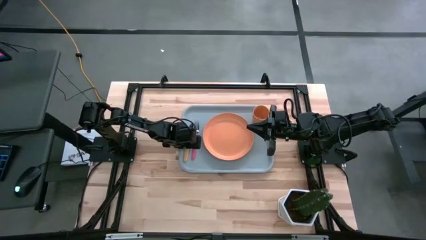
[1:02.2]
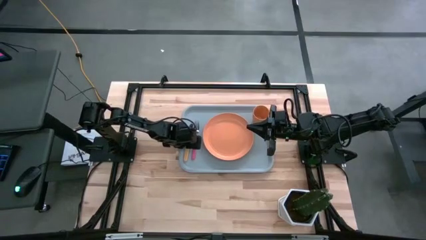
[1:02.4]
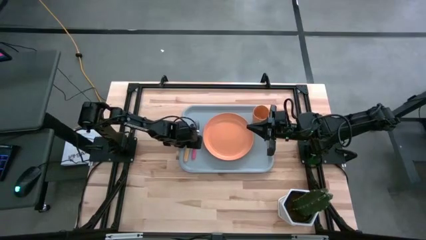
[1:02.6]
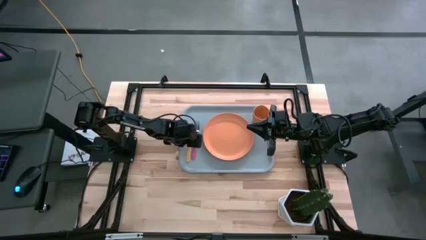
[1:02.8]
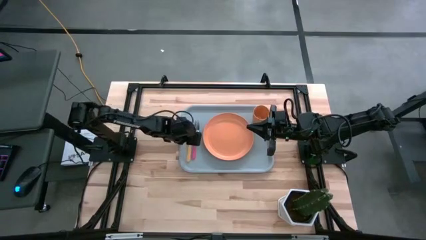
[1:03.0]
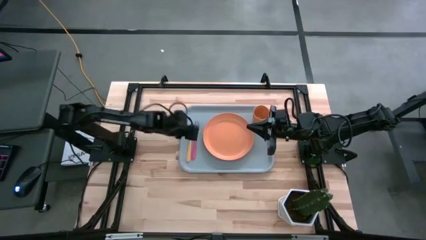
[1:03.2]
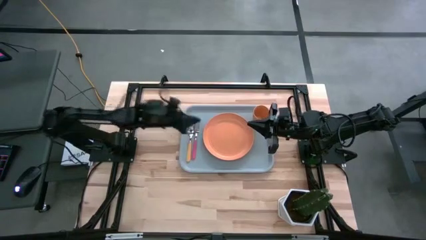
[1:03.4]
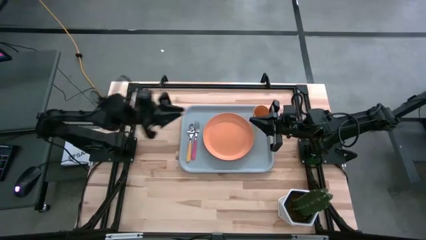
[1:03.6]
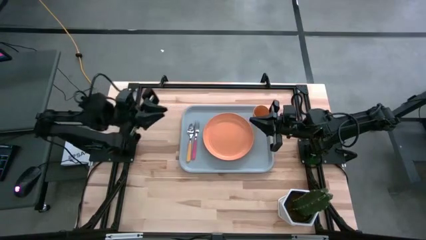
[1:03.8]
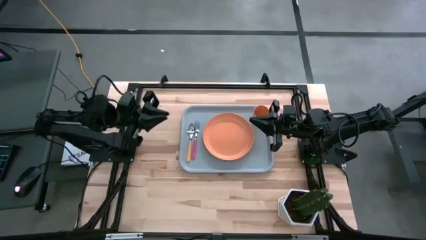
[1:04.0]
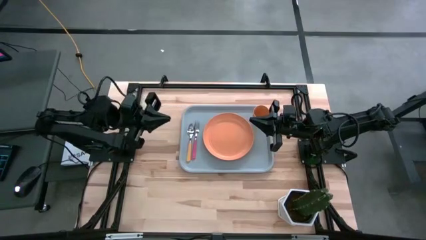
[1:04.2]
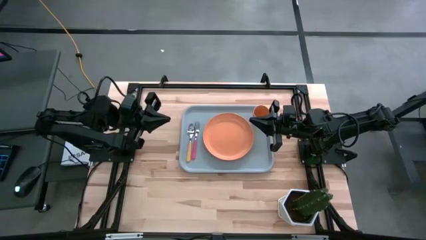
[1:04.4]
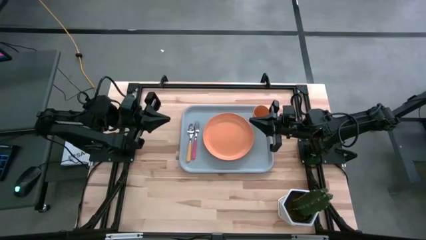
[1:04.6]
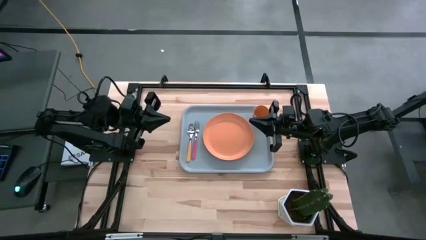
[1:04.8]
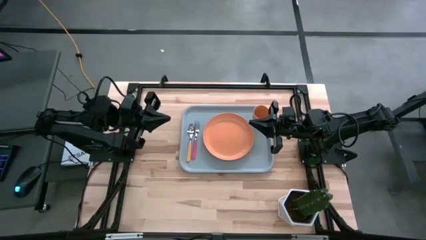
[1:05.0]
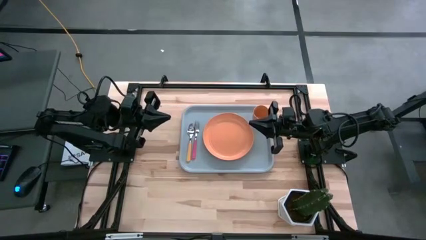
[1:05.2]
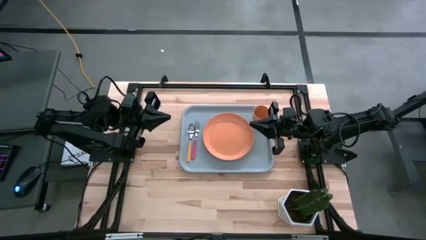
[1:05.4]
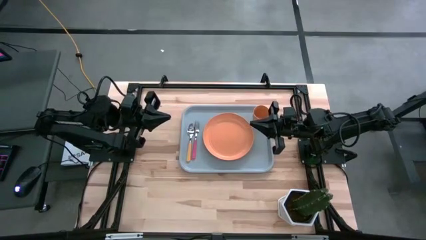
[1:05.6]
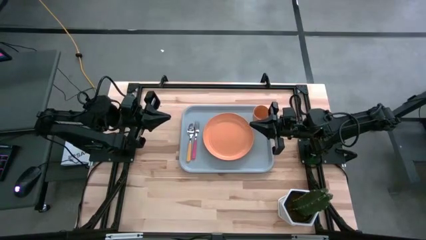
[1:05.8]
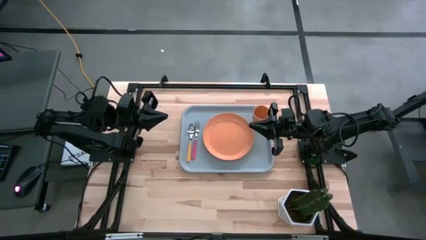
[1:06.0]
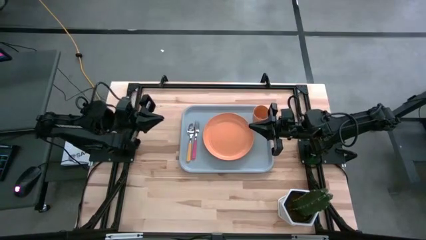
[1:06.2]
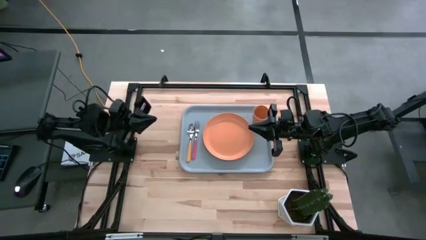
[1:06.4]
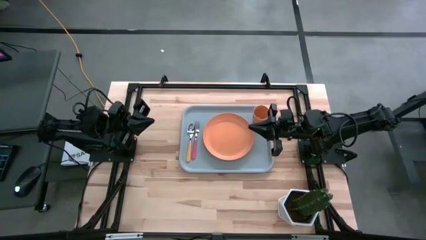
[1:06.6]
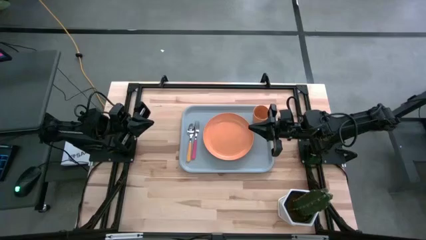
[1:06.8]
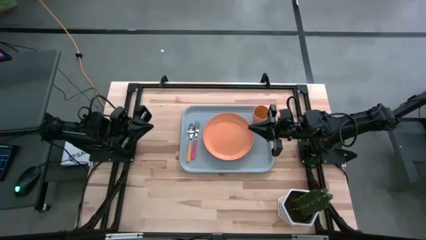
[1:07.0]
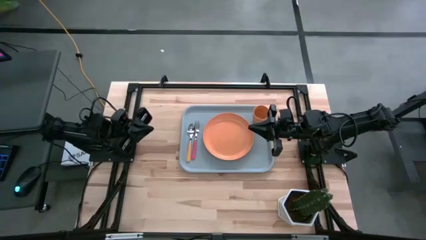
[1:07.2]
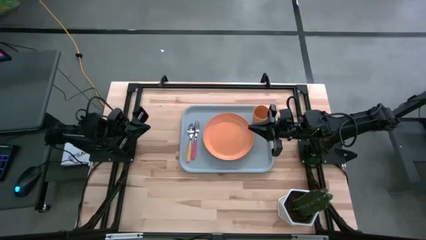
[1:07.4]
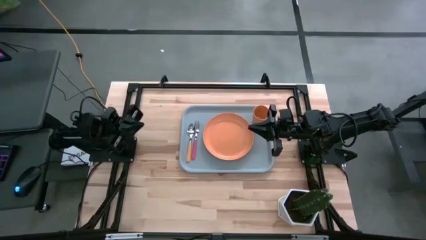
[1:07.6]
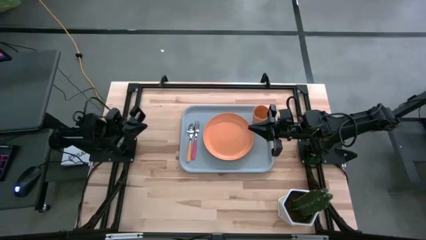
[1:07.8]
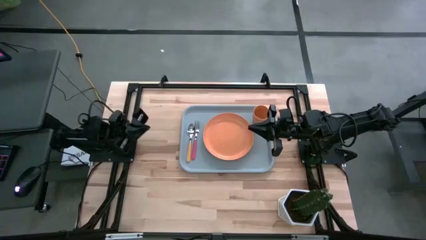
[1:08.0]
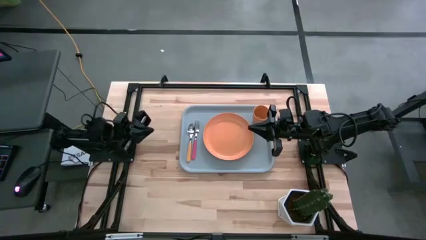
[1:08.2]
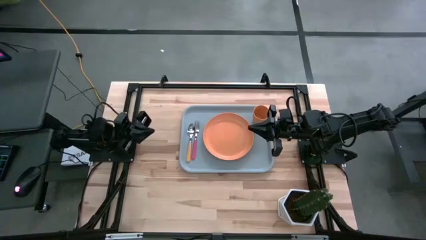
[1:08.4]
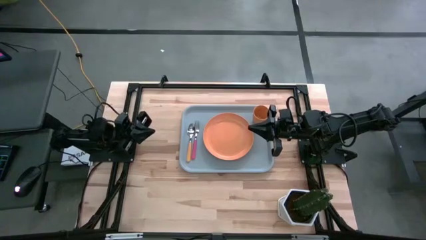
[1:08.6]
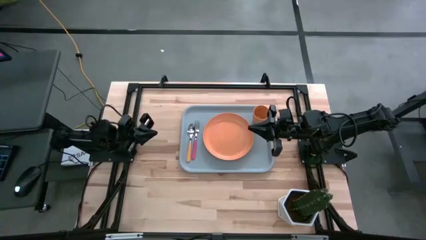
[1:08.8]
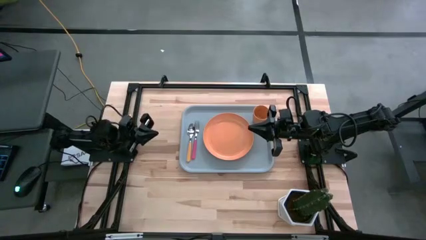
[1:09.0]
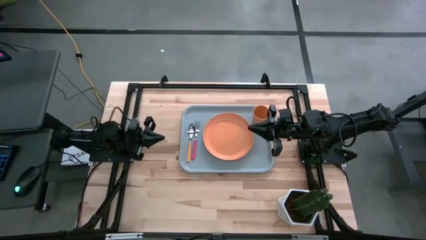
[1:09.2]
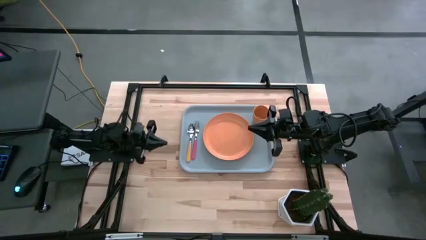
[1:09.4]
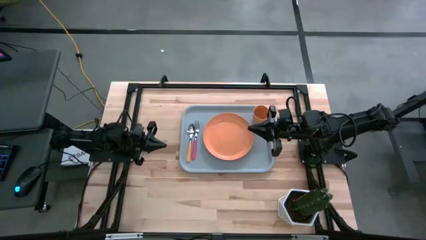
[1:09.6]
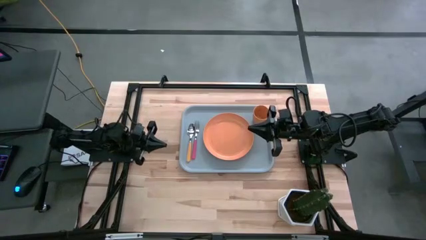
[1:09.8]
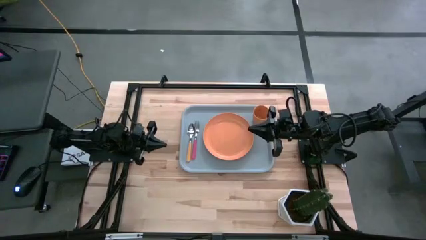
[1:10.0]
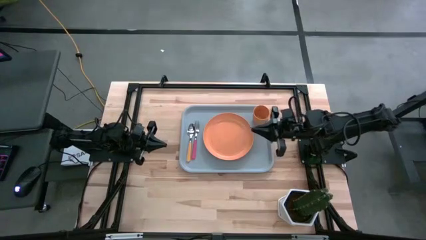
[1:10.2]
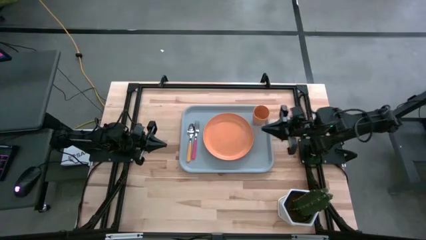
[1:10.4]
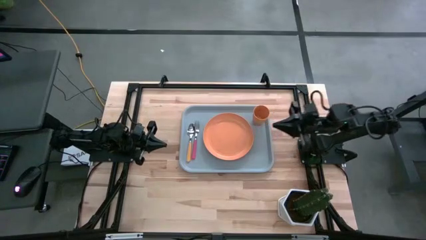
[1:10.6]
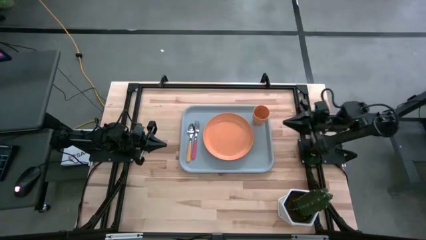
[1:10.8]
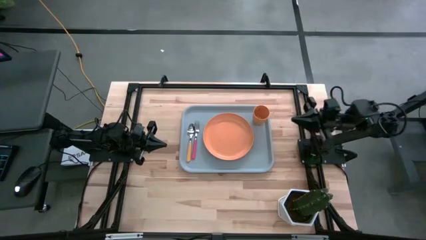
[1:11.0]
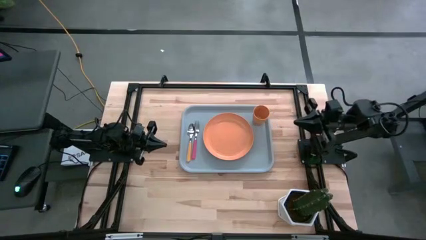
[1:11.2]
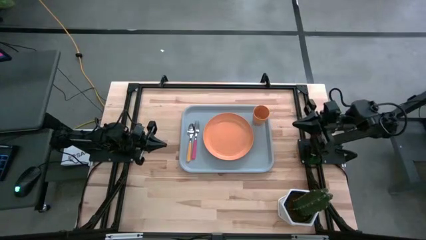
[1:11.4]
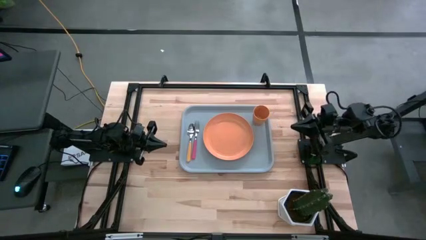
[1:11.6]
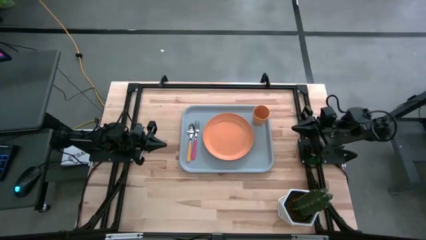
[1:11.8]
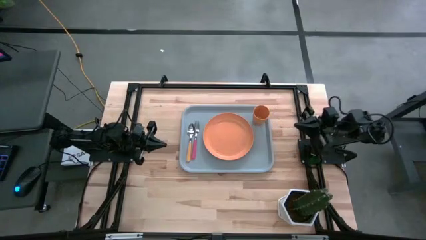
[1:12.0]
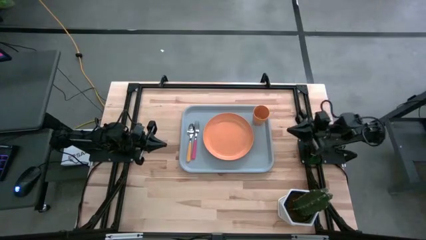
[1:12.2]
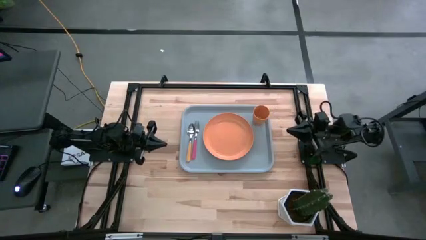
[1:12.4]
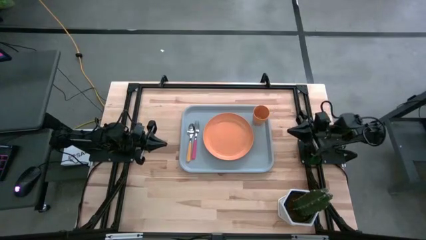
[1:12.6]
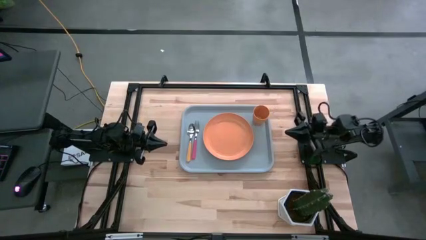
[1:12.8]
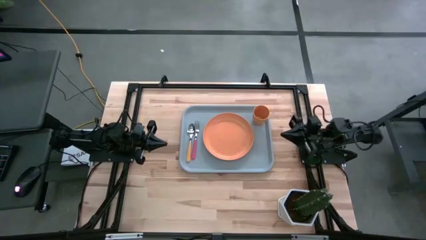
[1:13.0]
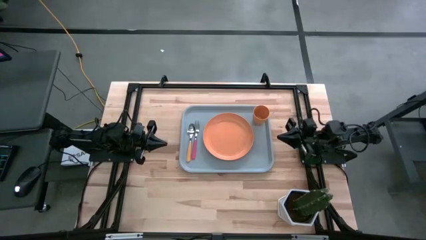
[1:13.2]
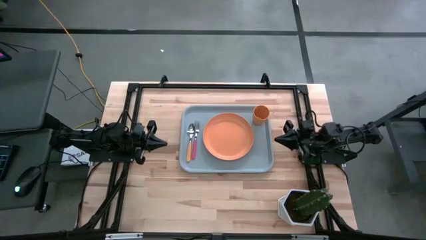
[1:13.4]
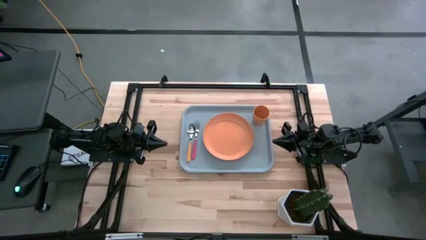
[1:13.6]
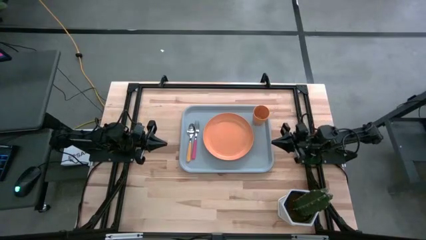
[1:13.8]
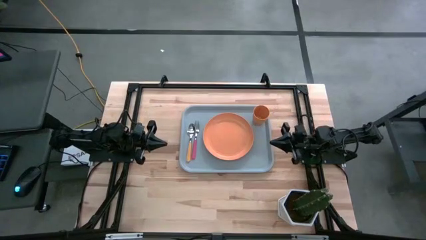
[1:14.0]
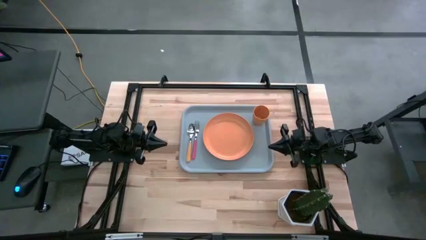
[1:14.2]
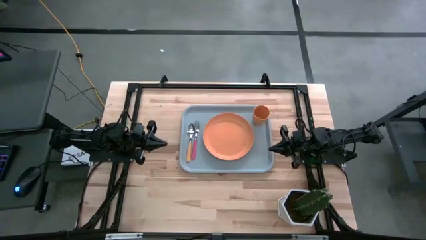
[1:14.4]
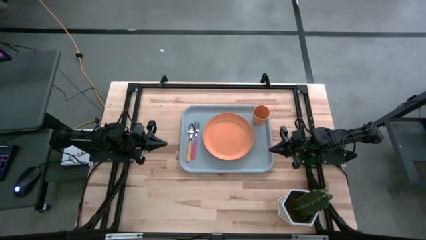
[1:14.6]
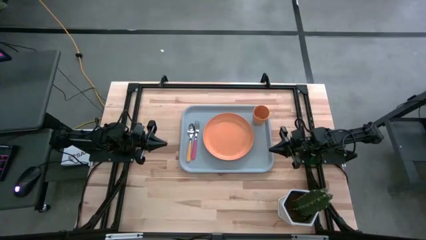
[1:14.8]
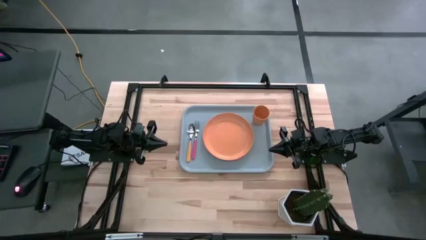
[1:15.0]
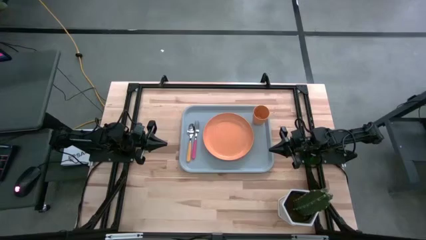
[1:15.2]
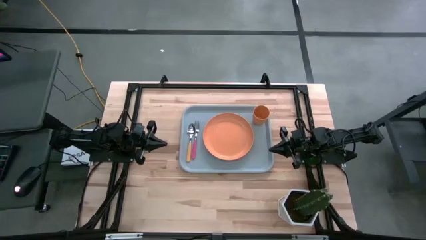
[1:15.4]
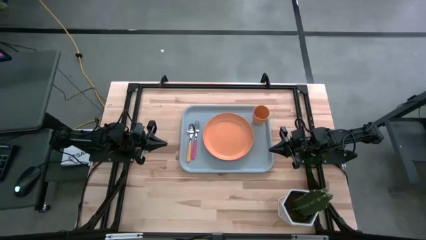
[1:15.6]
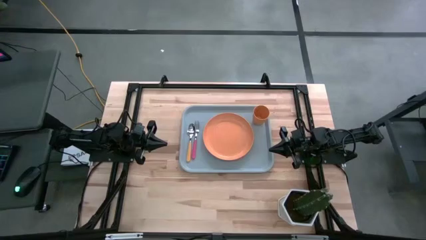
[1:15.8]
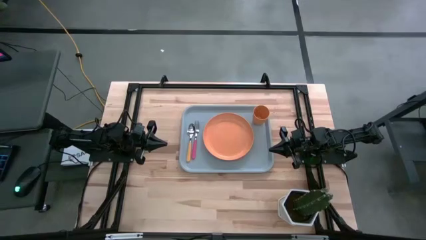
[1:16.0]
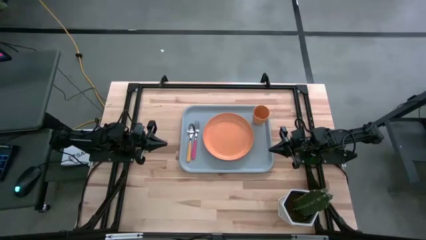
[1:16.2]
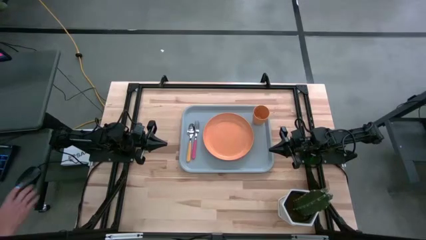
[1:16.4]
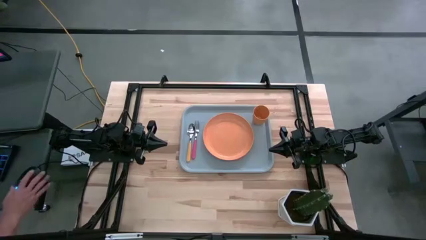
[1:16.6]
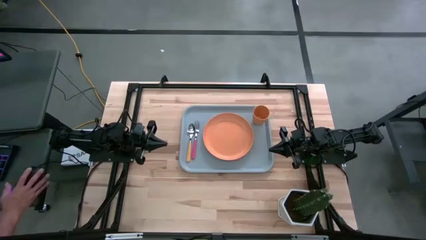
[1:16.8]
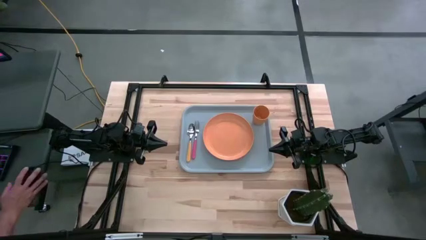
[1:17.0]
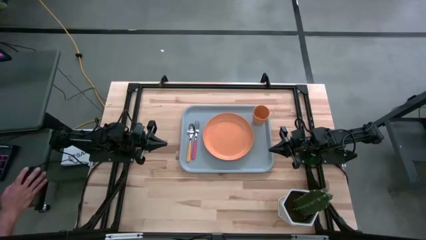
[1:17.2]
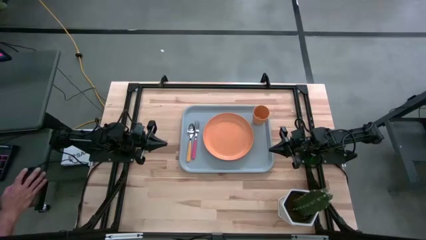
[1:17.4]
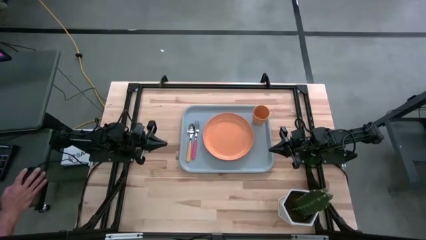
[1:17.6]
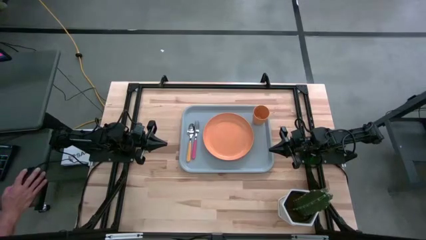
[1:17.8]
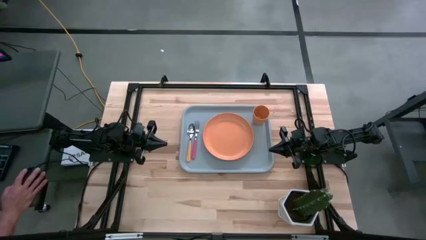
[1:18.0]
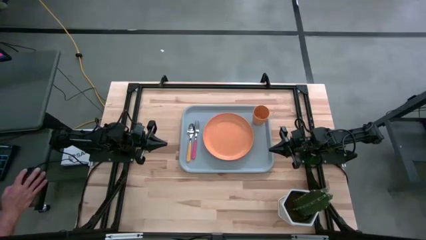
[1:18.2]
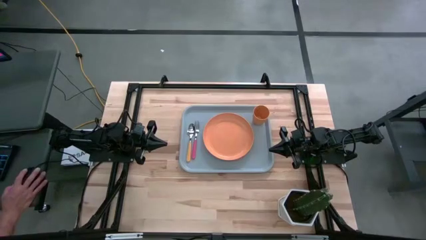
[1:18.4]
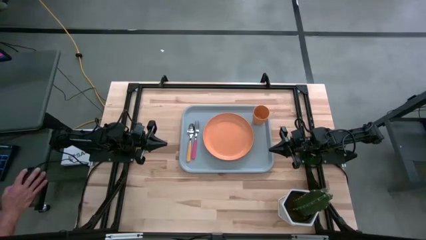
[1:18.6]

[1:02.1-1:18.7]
Task: Pick and place plate/cup/fork/spoon on tray
Return to Home Position
